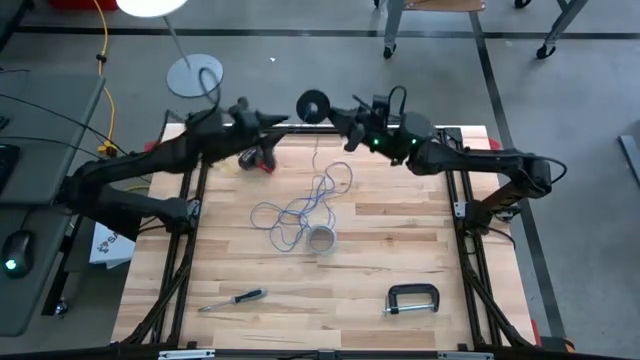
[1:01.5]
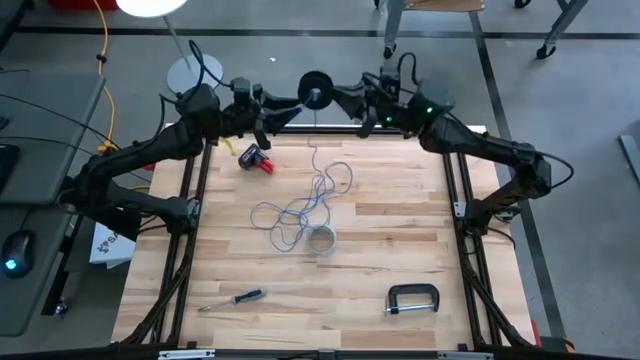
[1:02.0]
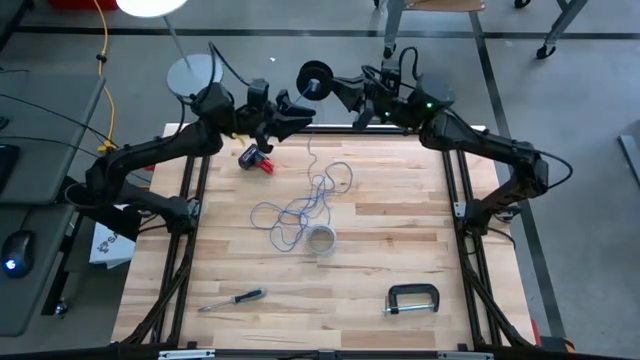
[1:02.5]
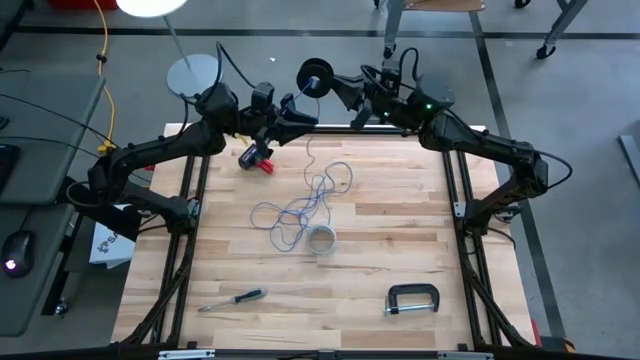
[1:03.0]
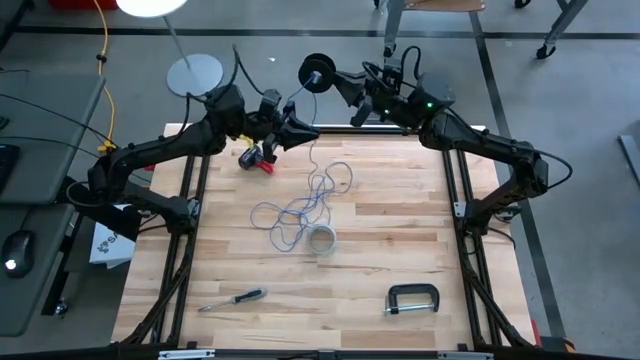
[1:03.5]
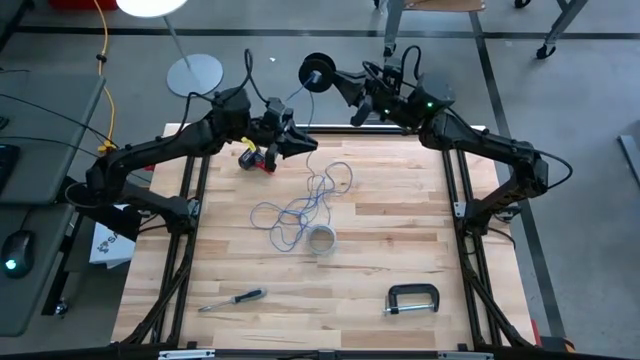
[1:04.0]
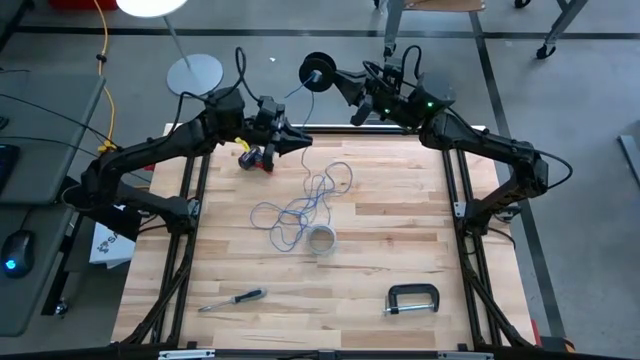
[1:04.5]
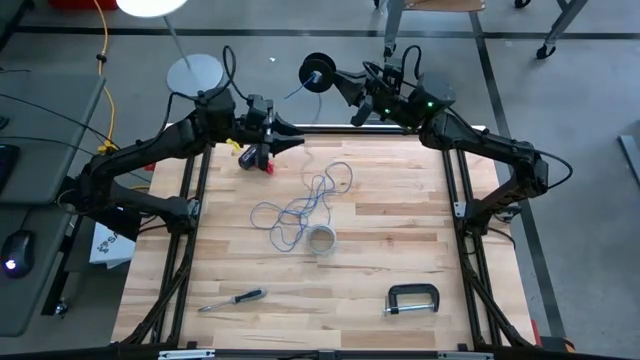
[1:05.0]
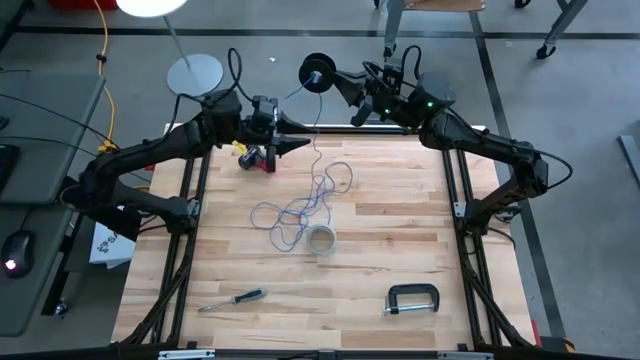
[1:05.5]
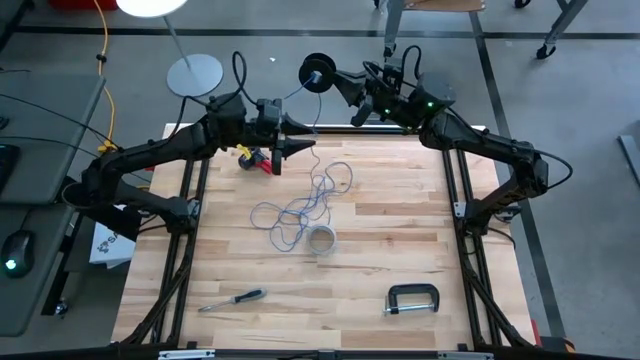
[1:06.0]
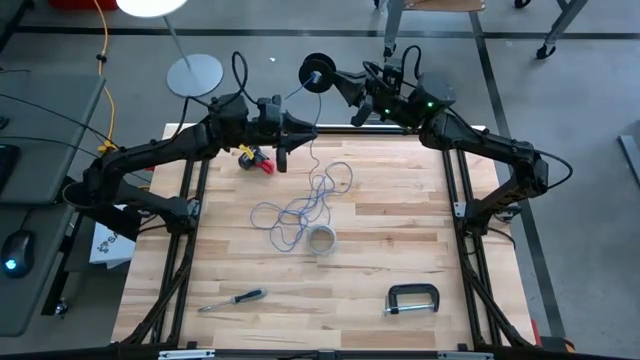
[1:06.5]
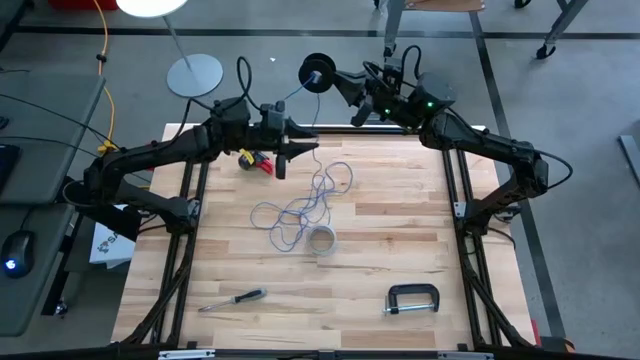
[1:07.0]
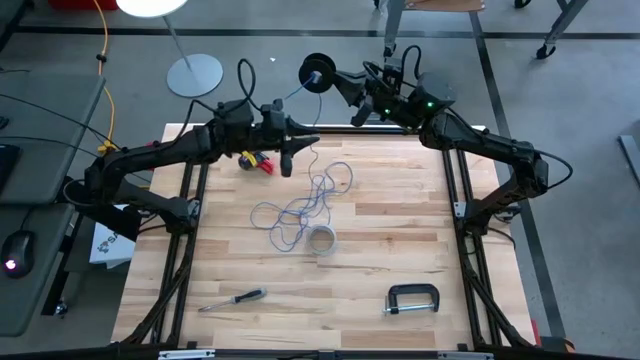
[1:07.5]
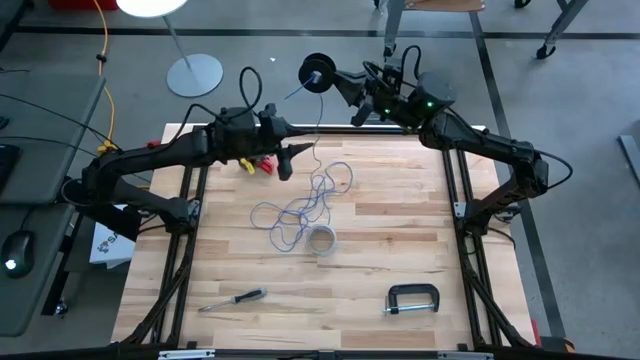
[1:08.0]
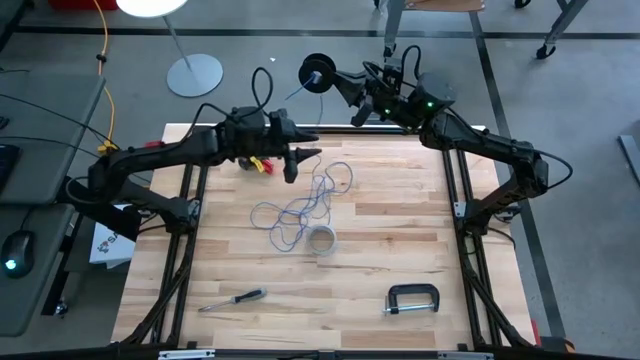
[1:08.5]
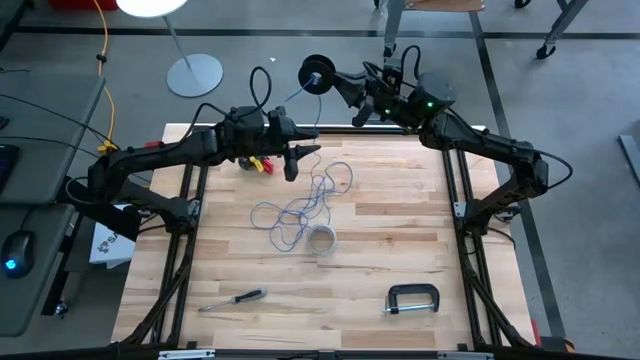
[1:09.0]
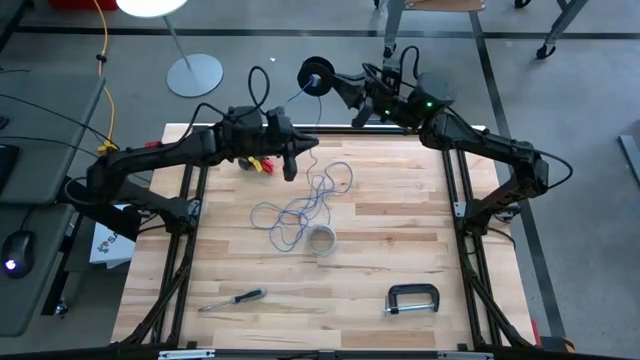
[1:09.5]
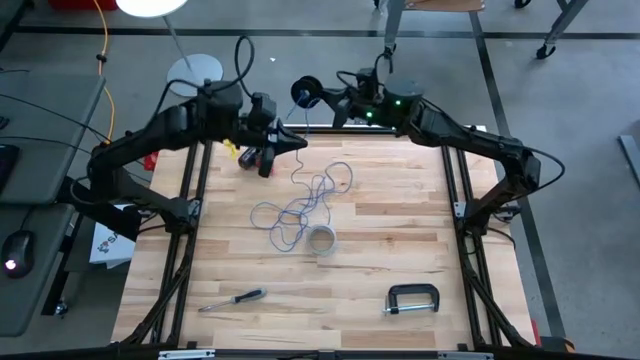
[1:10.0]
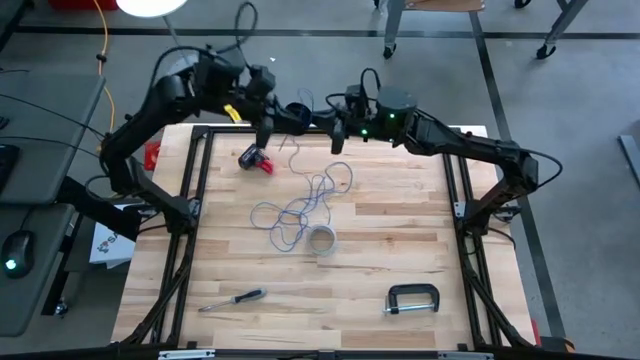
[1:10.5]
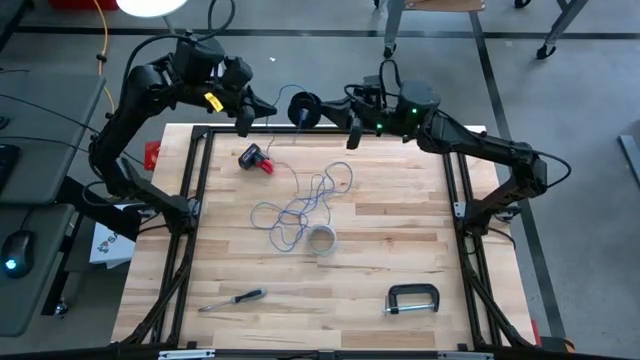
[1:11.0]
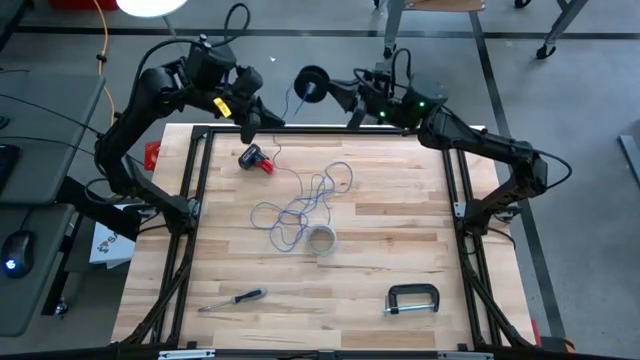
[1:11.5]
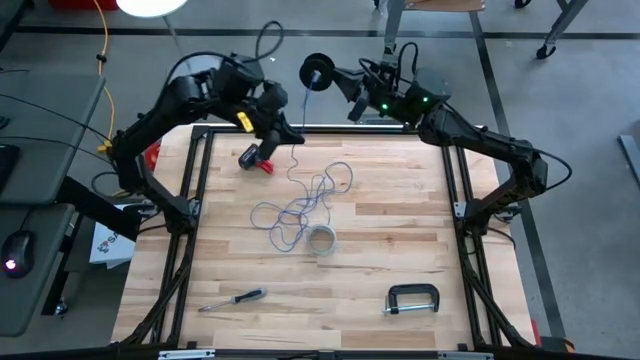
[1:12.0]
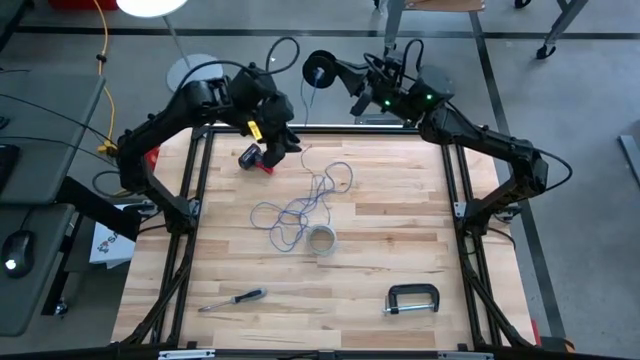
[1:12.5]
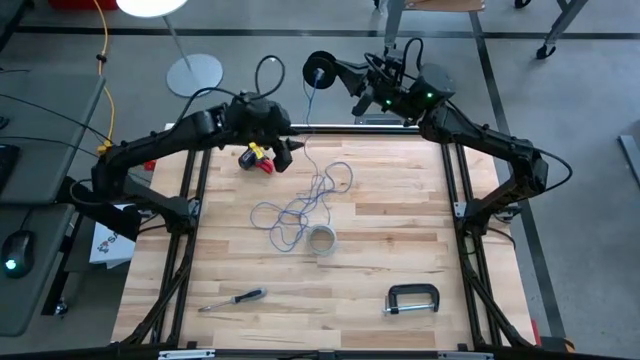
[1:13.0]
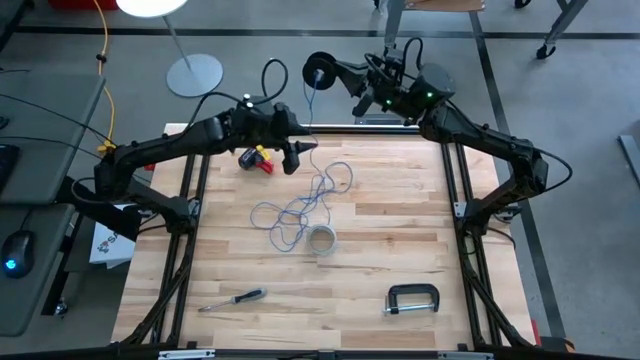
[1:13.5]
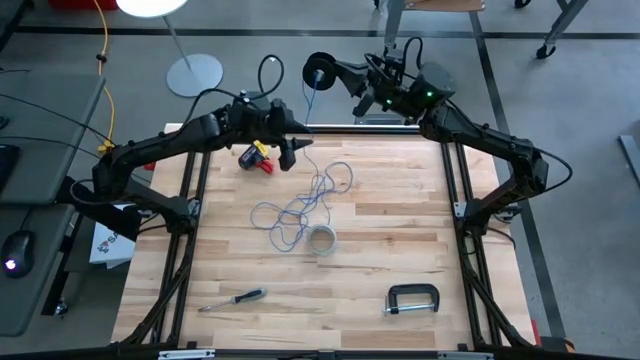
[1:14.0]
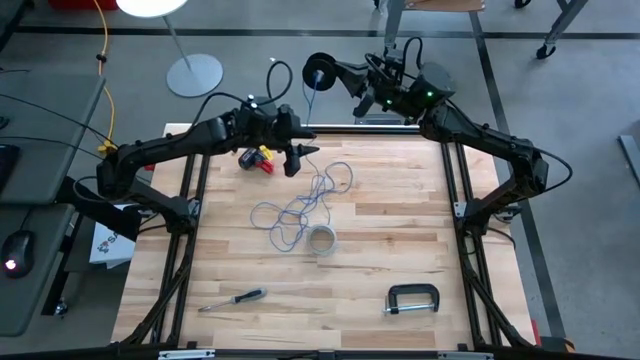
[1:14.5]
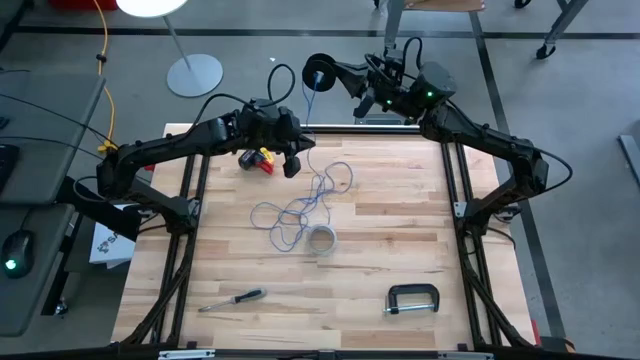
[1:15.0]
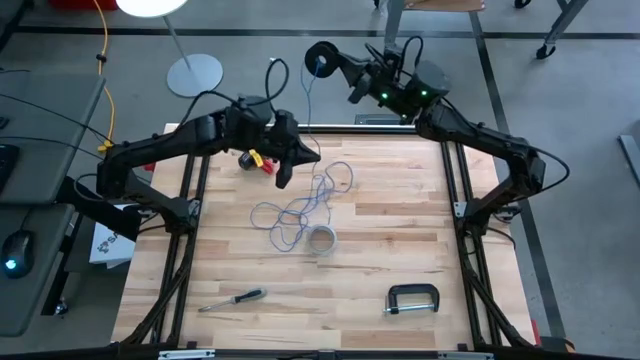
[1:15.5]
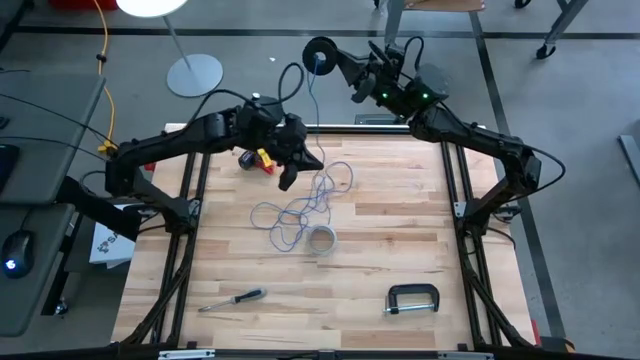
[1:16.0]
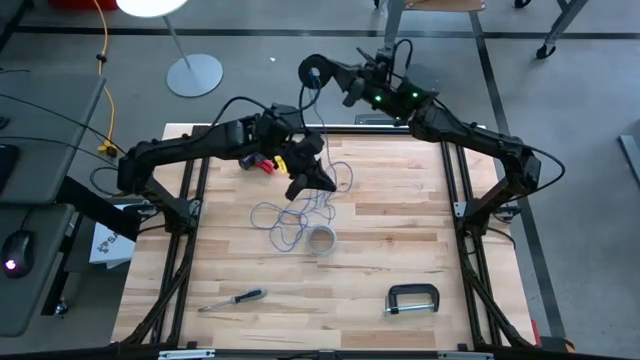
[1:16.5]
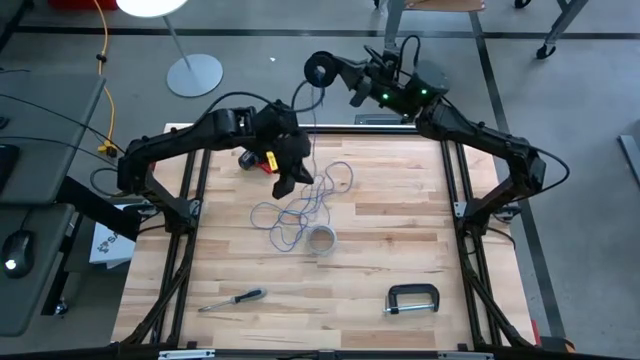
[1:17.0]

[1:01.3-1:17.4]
Task: Coil cords
Coil the blue wire on the spool
